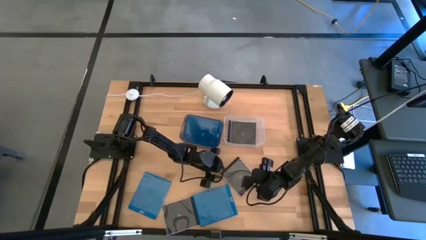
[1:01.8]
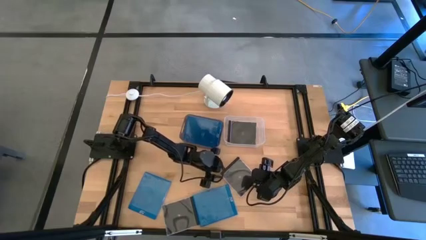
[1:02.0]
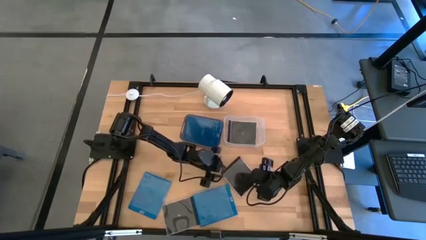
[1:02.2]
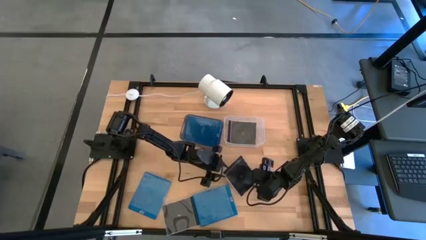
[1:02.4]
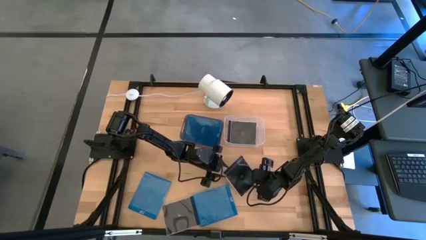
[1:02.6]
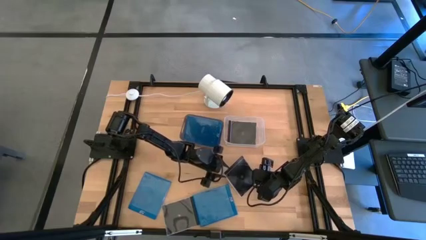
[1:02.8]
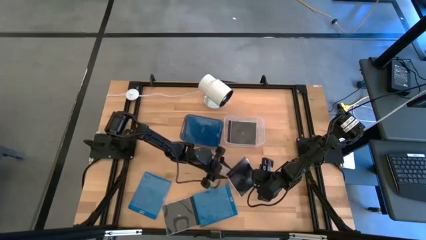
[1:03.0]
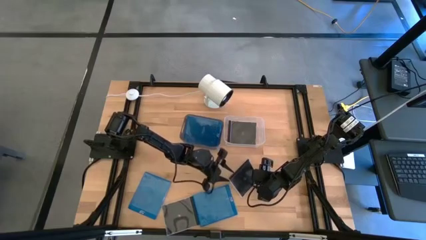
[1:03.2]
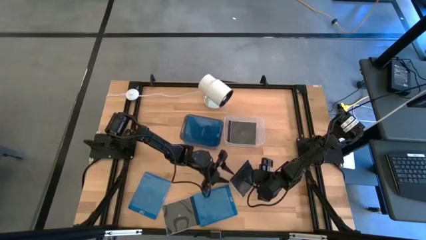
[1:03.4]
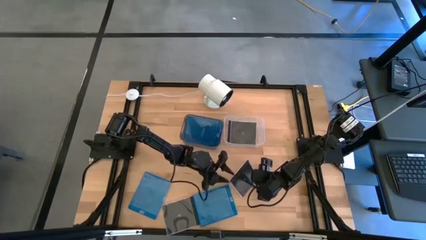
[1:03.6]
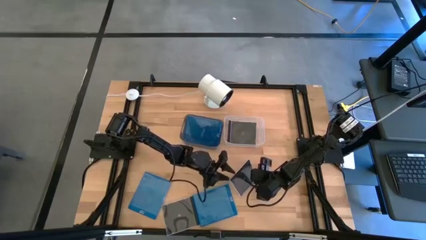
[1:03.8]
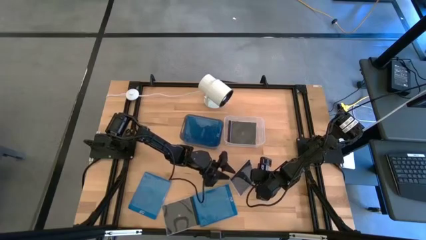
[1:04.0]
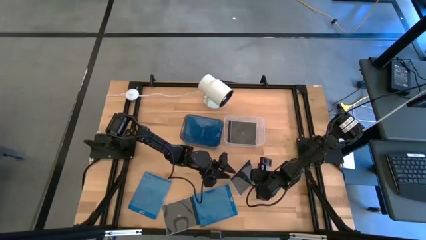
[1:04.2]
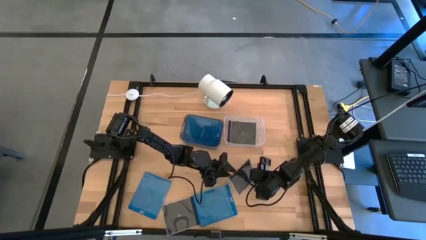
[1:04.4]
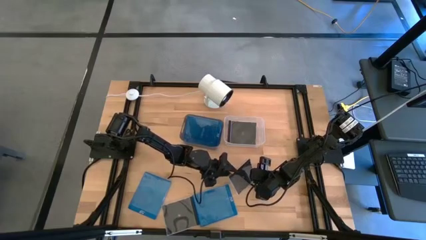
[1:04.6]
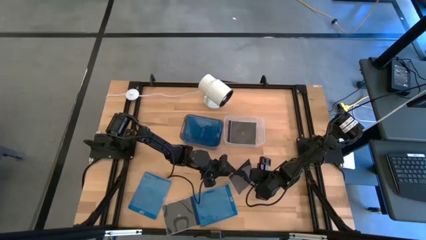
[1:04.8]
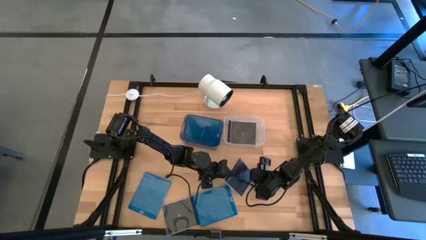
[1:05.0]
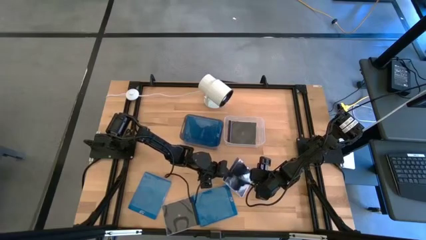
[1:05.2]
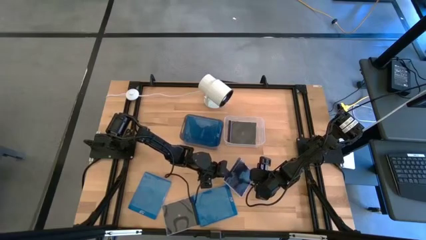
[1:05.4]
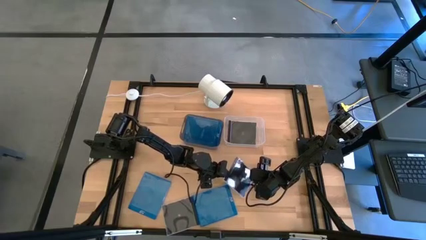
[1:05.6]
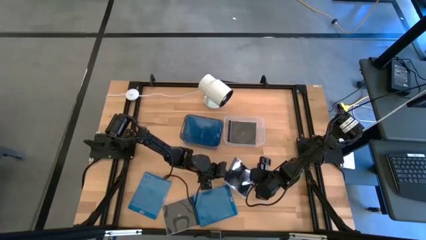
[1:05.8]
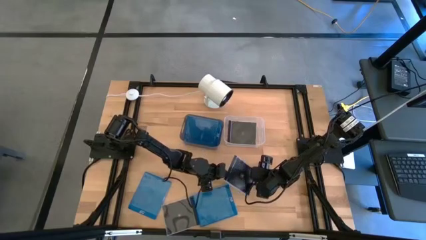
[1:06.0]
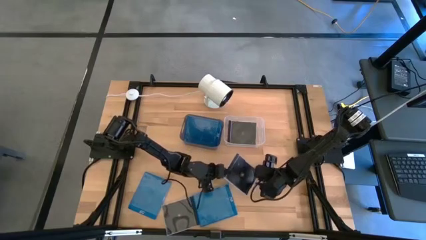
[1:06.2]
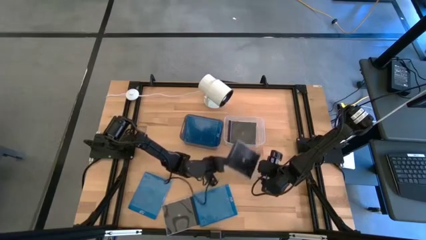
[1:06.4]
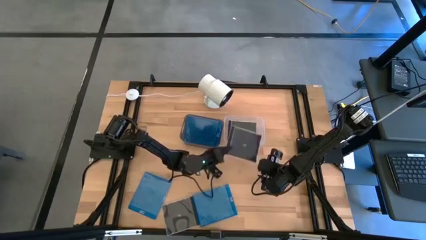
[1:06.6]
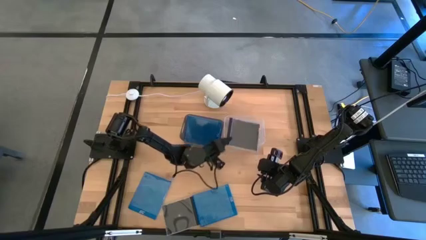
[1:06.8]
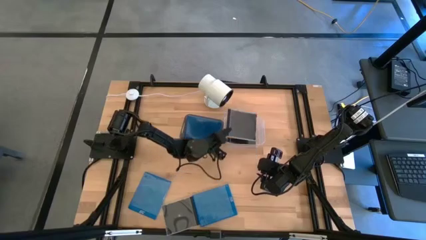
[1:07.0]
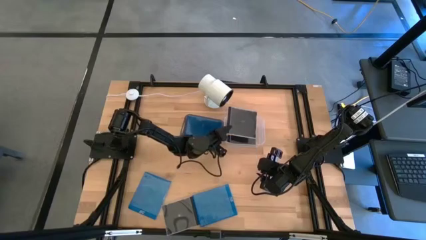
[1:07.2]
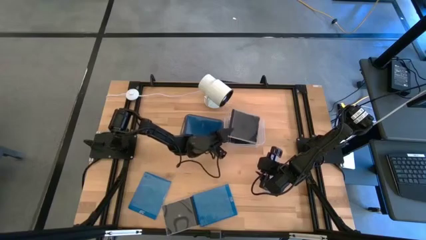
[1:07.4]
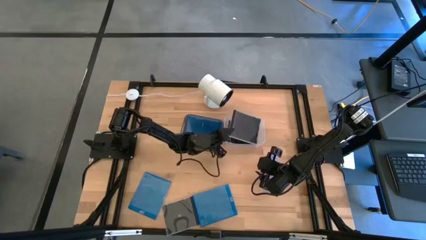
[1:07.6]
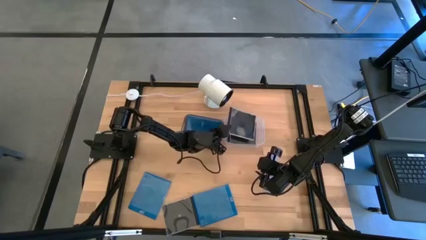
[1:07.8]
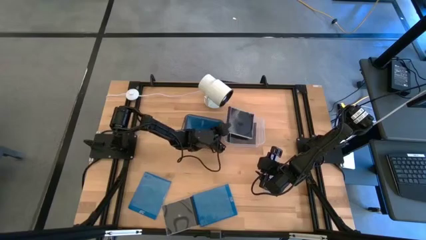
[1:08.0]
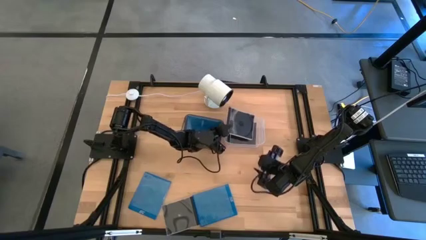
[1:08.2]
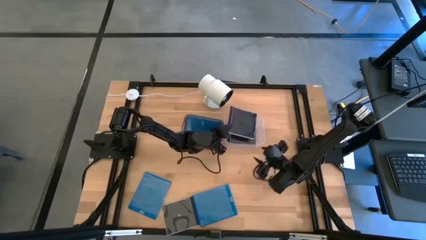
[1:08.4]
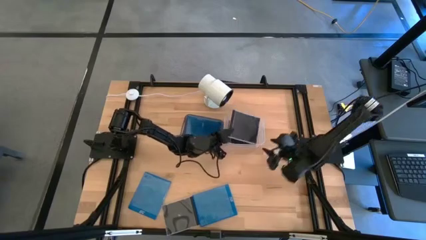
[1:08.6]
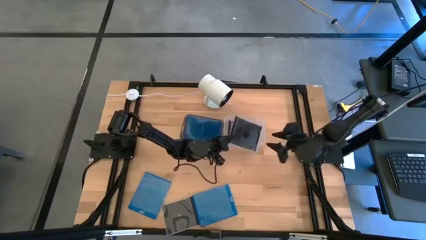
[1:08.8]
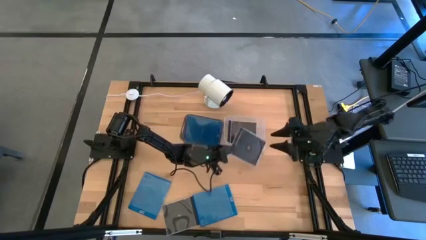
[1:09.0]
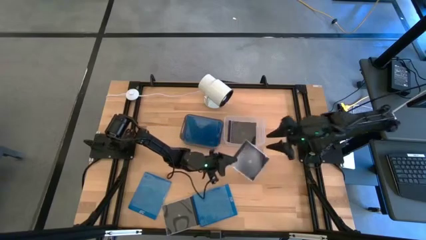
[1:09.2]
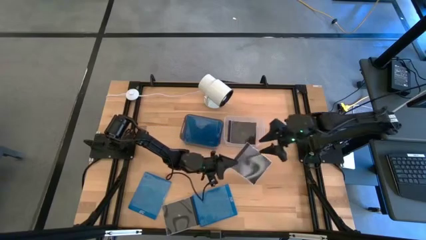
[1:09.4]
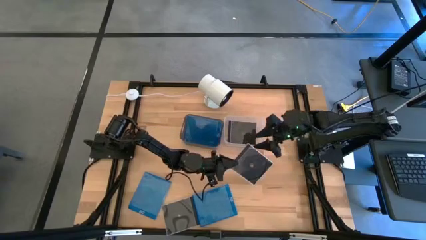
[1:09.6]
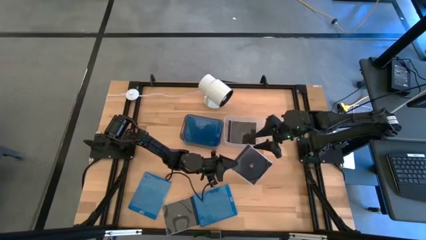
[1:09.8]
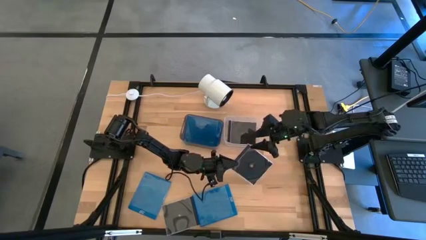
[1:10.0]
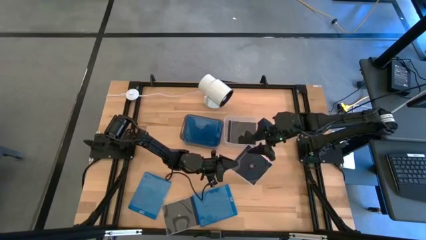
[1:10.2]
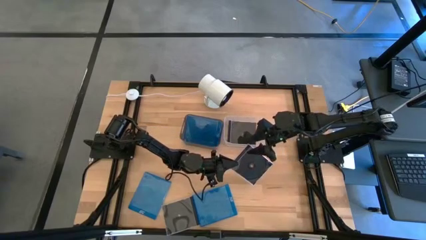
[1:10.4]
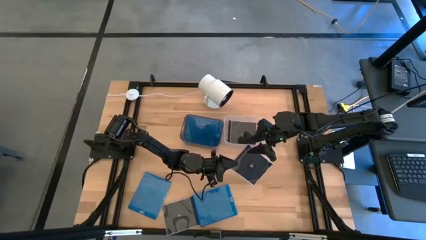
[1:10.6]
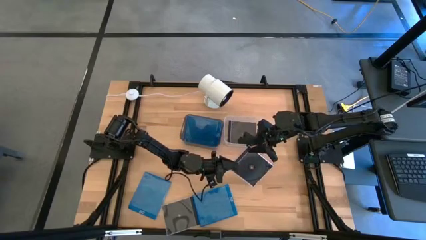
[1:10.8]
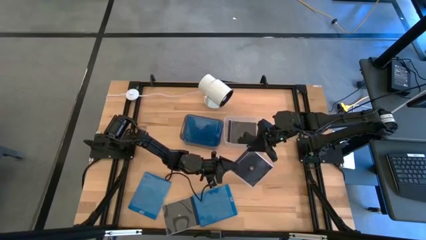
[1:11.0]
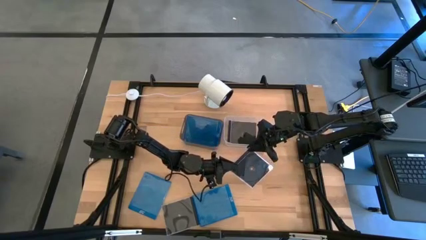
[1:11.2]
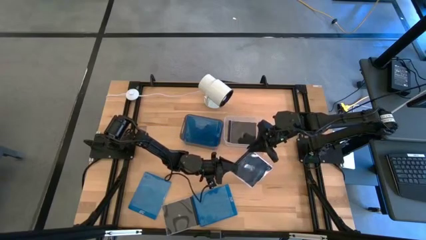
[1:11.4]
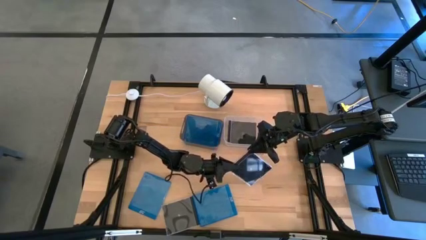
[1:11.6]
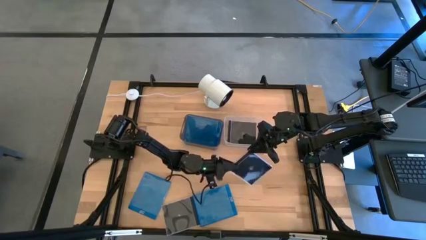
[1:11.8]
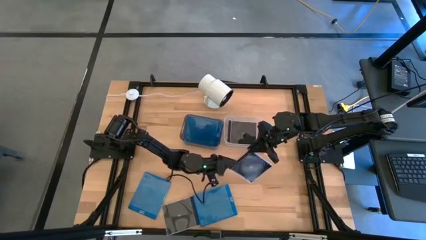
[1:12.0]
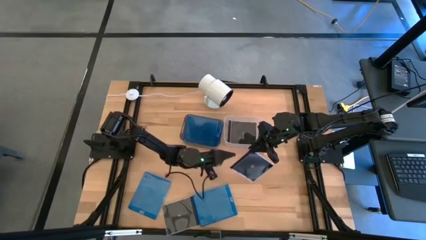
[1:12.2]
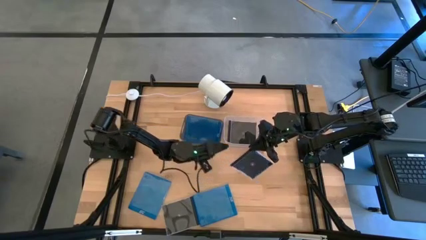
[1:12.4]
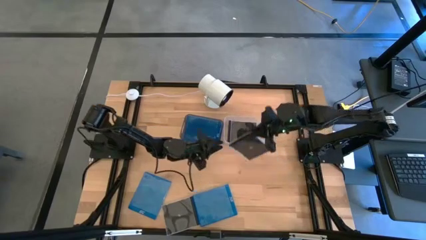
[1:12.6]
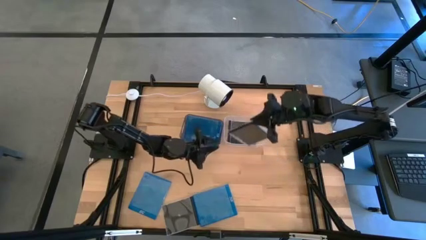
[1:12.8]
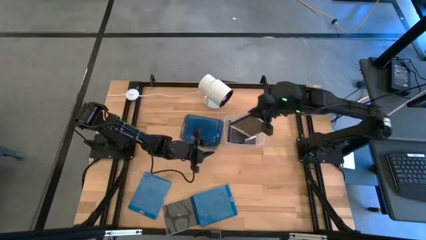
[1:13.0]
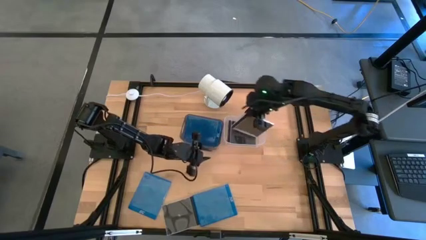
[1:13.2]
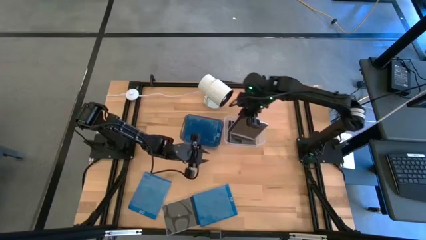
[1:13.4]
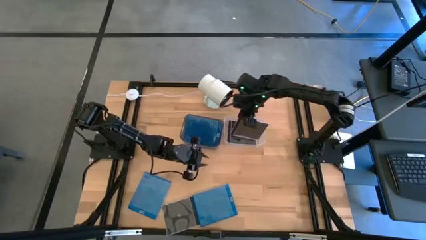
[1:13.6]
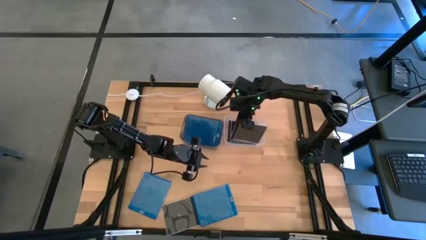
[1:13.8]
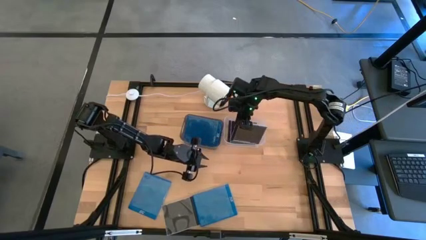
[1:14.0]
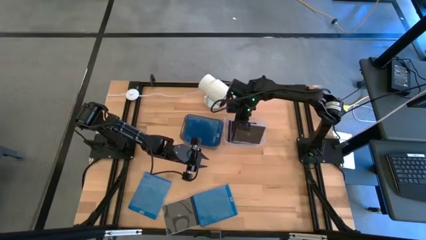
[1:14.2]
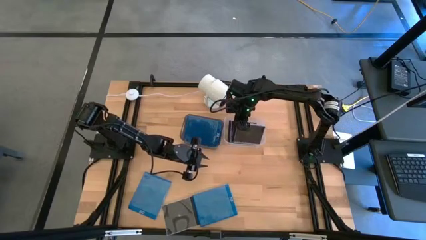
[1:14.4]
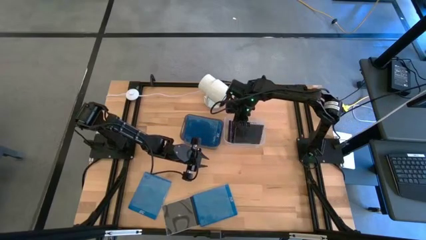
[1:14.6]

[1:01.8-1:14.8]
Task: Pick & place jewel cases by type
Put the right black cd case into the transparent bin
